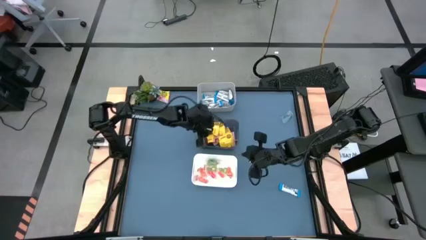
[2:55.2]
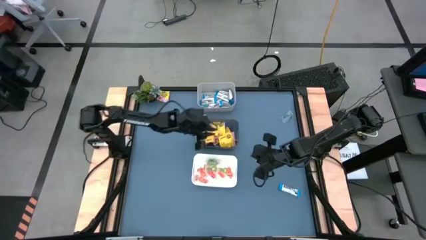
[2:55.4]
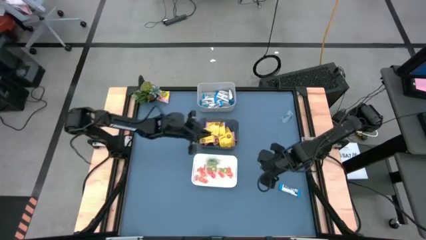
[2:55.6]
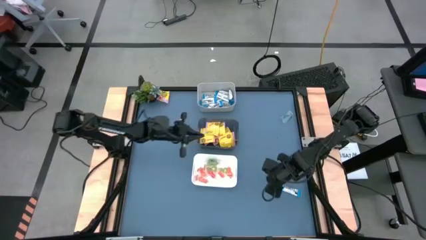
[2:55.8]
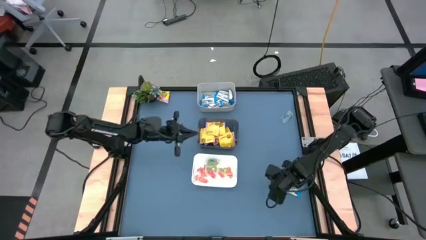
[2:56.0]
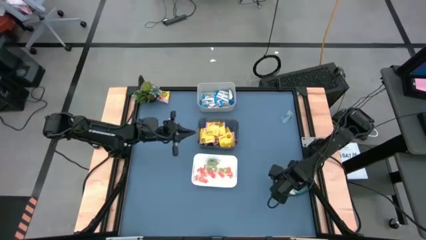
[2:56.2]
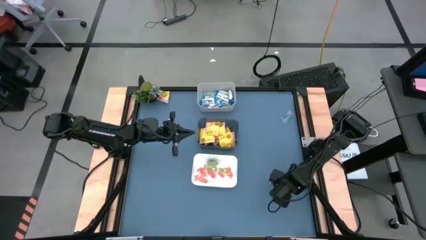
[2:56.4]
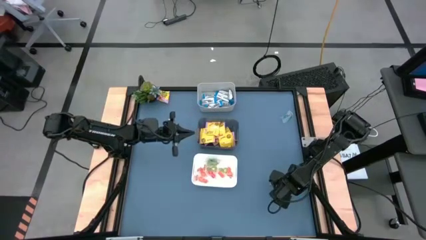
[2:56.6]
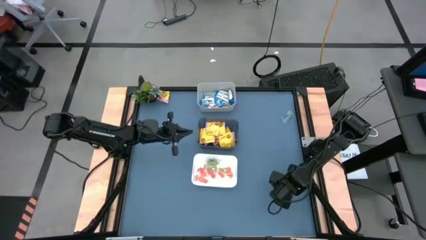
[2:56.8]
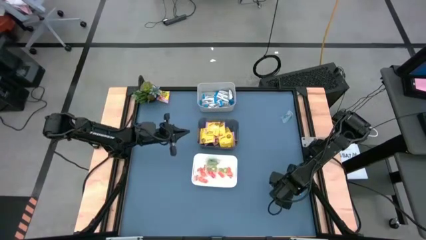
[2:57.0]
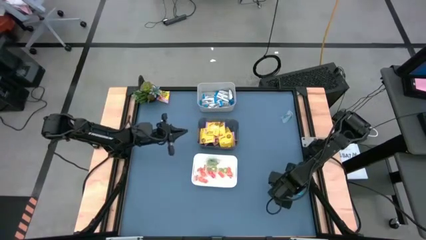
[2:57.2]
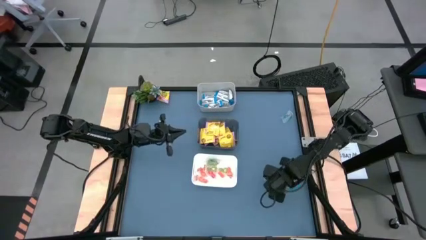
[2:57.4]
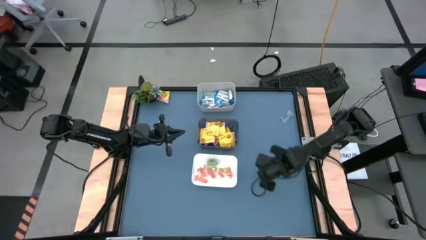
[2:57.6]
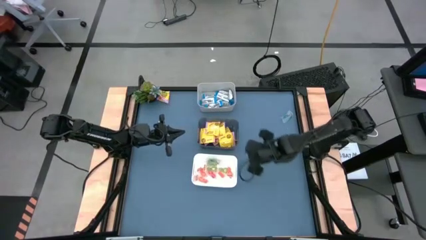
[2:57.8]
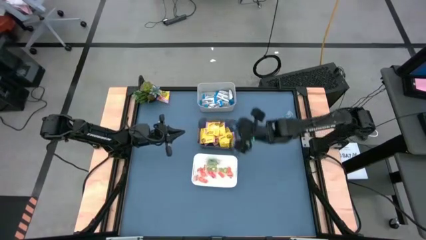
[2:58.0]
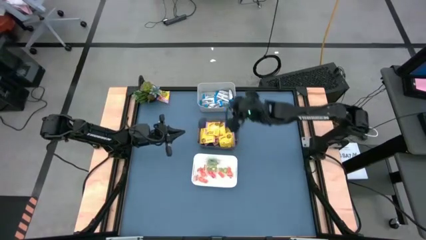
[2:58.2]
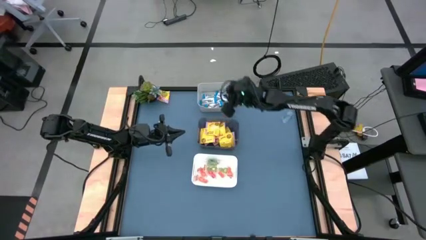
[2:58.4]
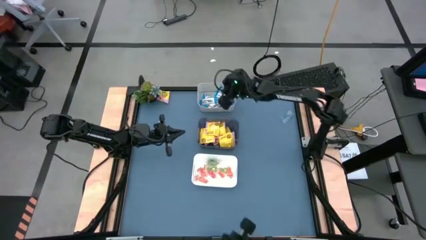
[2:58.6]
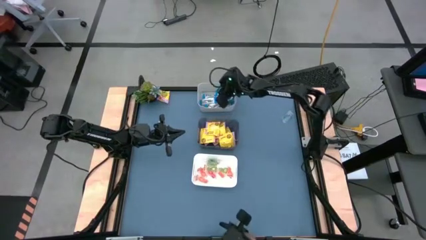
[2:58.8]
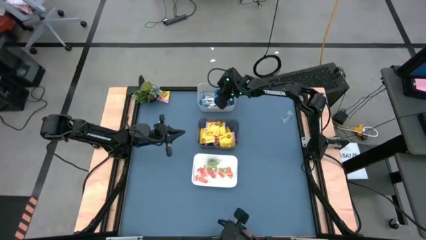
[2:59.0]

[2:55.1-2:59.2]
Task: Sort candy
Put the white chocolate bar into the gray bin

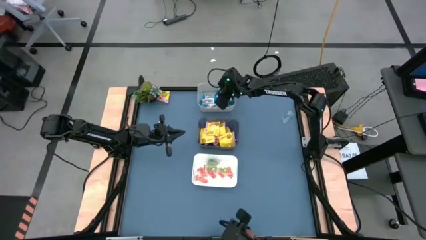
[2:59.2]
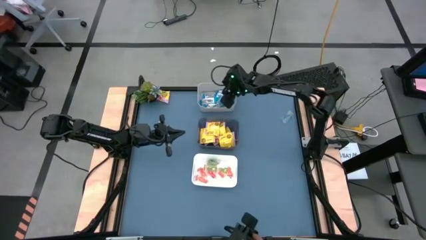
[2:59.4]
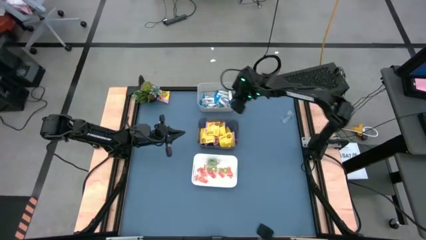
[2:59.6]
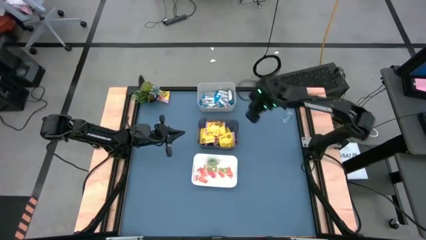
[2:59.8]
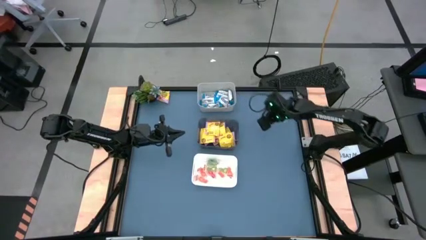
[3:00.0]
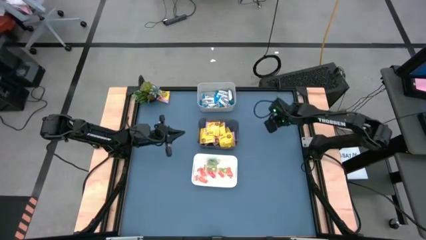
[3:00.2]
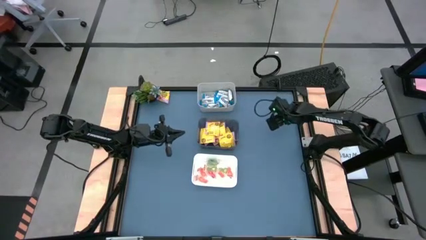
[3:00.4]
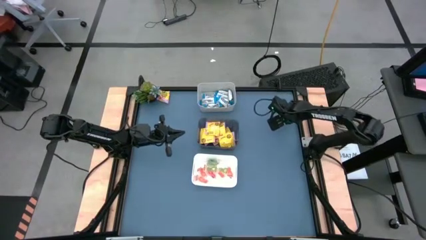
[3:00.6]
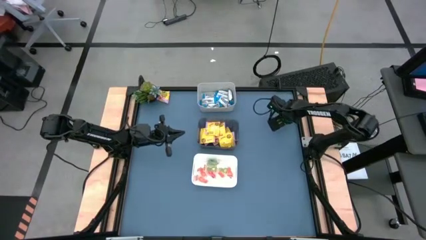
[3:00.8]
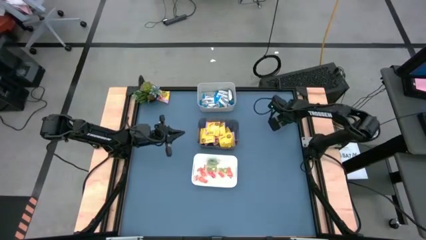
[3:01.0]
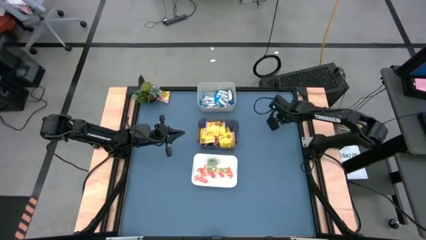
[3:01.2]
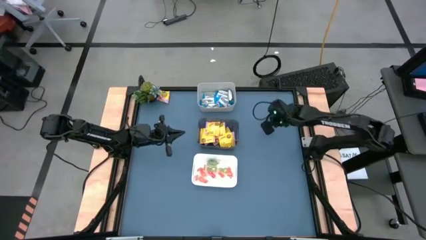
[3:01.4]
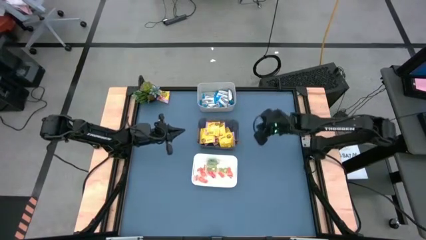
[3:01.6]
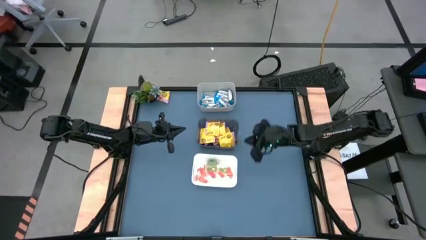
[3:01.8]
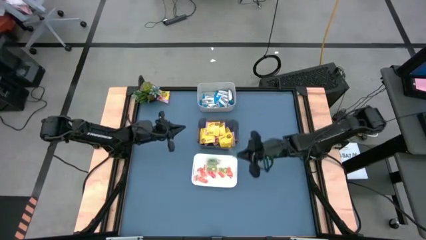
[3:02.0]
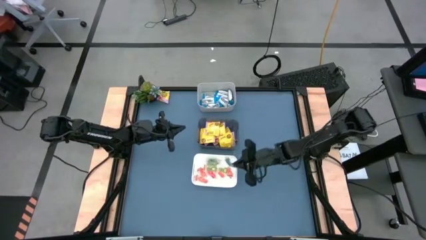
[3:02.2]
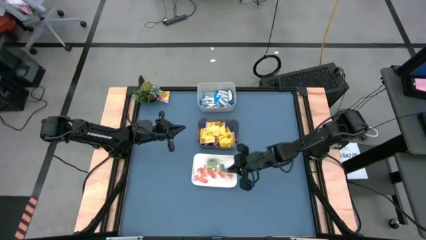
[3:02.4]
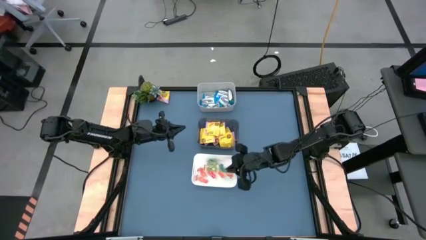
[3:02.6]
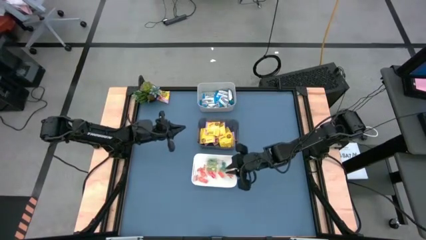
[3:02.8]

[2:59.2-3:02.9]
Put the blue gummy candy into the white bin

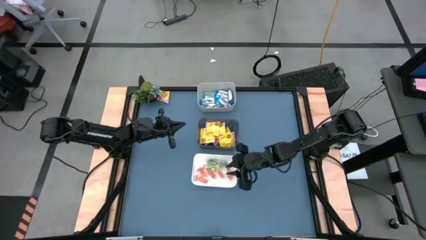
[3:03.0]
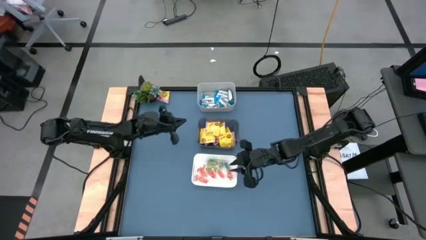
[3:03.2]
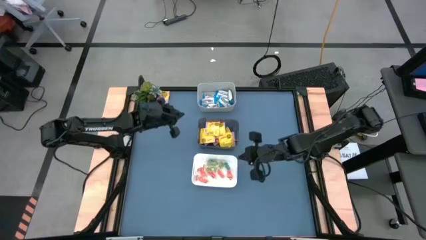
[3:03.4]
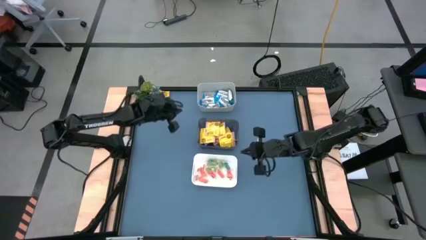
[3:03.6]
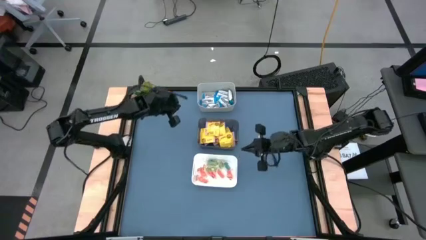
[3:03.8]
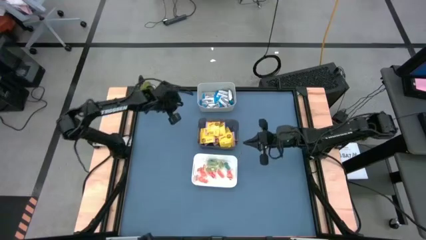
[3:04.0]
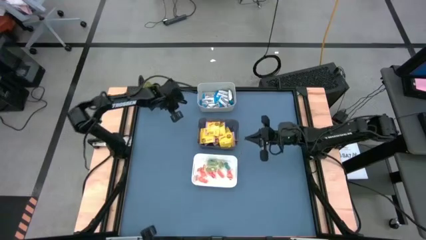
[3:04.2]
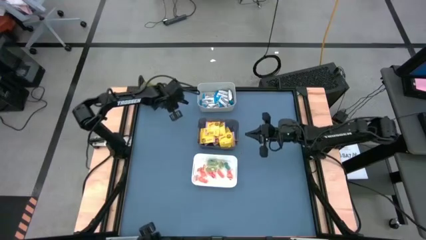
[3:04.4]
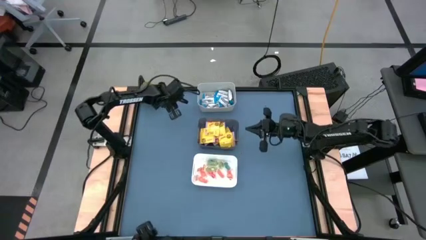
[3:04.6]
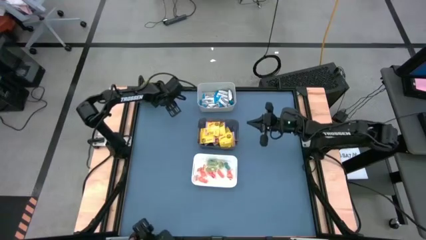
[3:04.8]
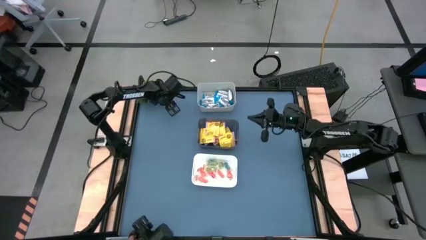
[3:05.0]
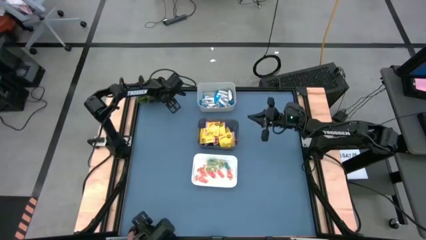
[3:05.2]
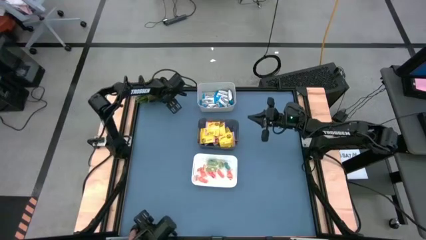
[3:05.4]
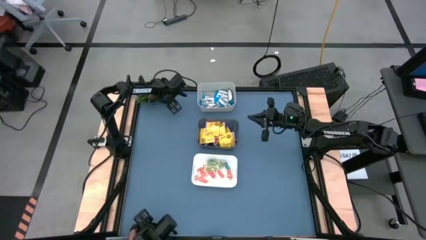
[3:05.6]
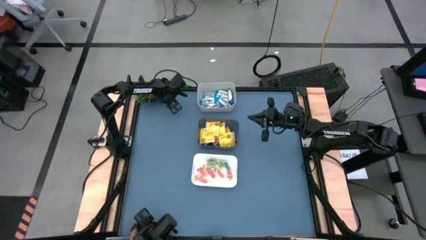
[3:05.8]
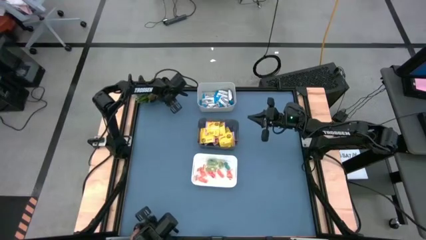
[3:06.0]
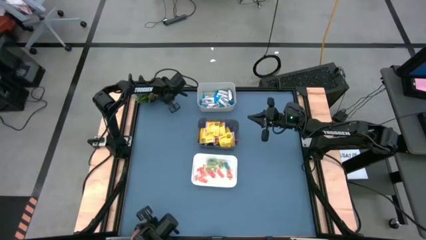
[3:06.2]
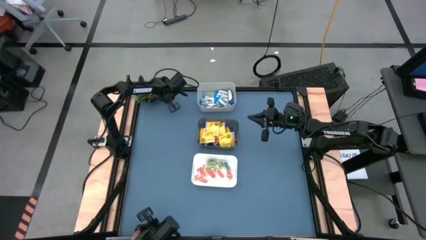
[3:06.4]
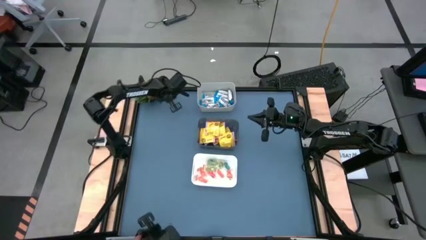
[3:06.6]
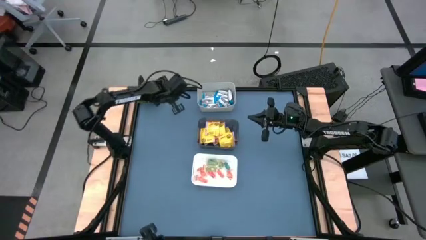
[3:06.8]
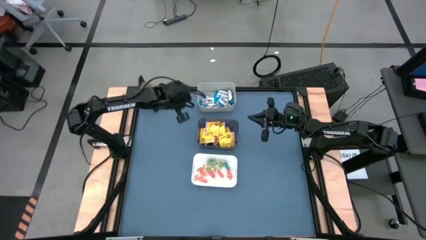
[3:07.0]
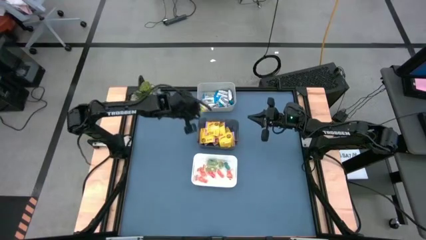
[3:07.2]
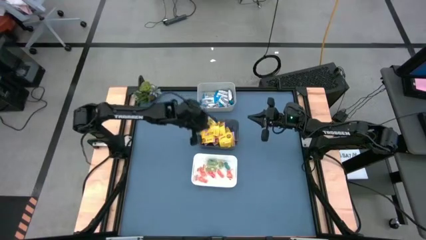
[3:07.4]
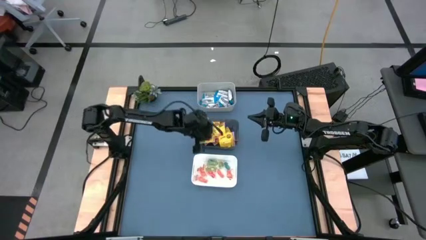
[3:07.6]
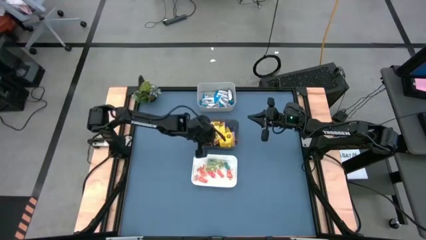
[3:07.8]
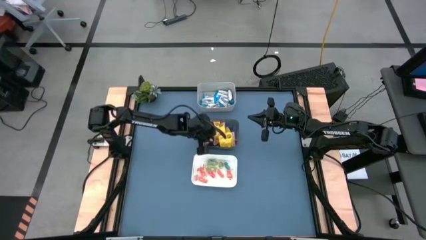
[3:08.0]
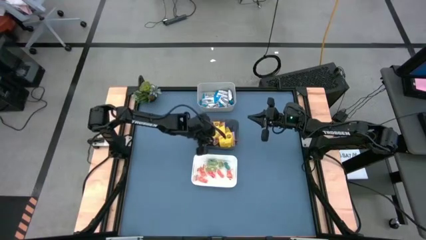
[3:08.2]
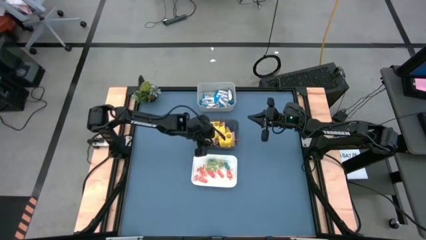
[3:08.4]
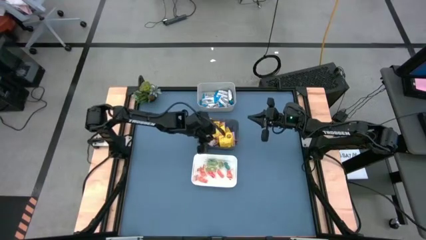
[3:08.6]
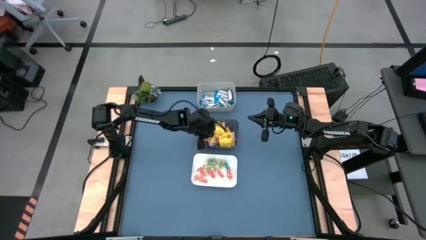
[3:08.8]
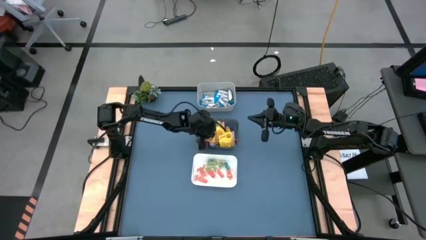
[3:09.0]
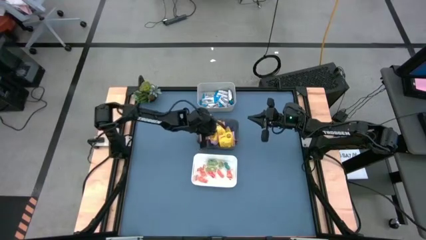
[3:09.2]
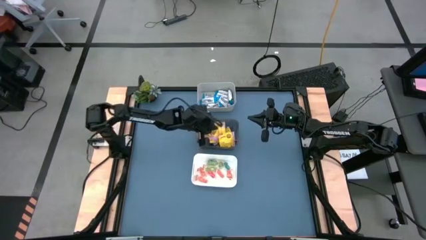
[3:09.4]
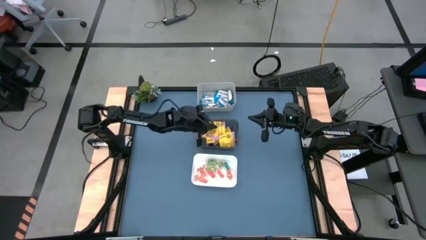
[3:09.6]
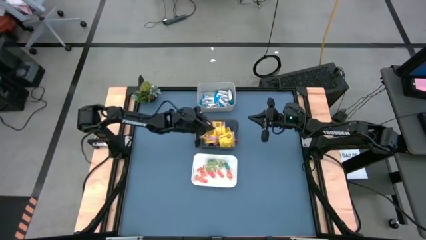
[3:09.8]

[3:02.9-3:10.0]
Put the yellow candy into the black bin
